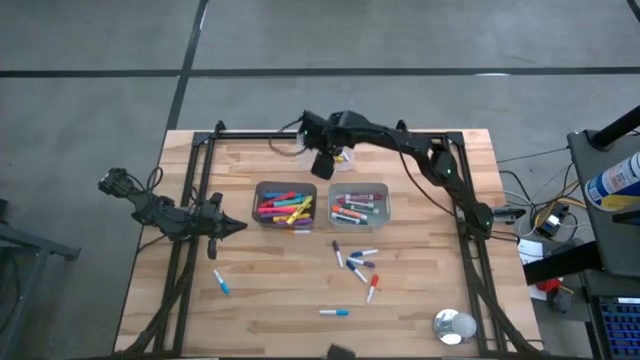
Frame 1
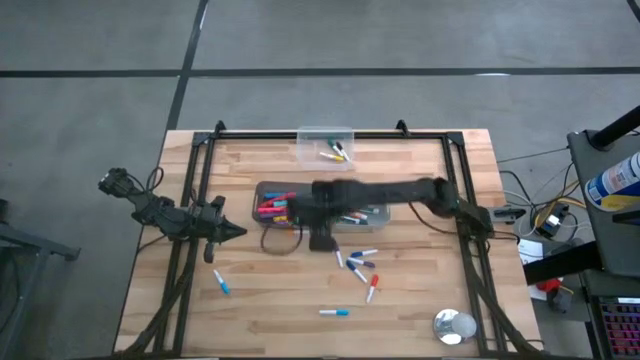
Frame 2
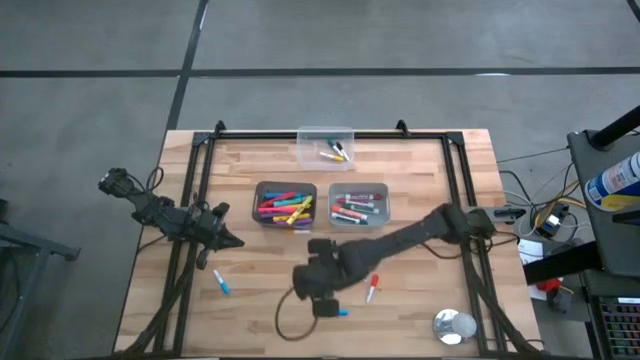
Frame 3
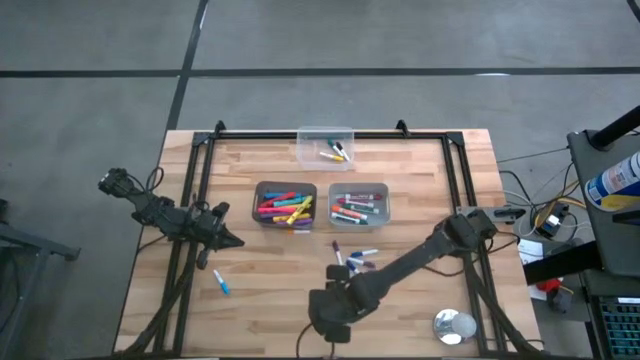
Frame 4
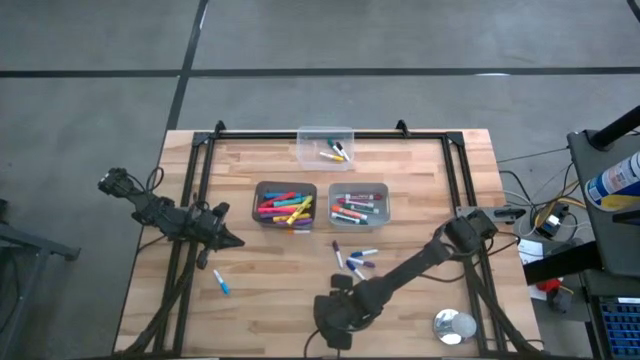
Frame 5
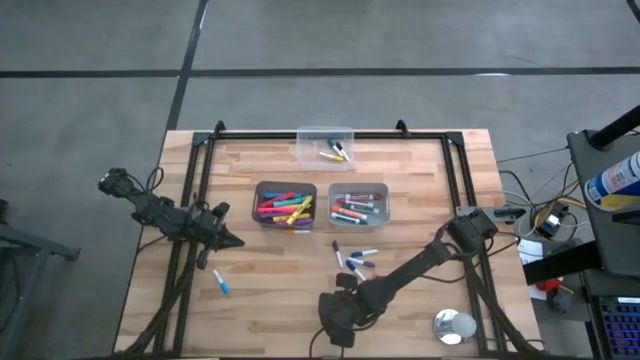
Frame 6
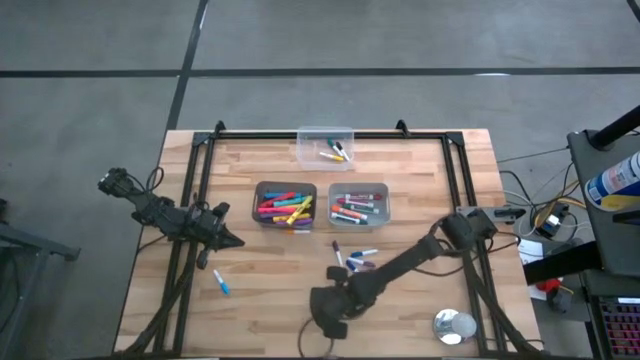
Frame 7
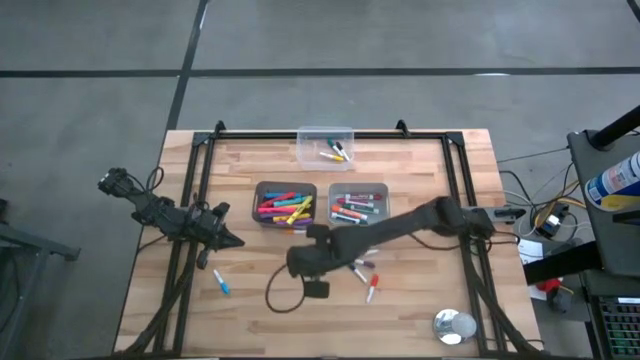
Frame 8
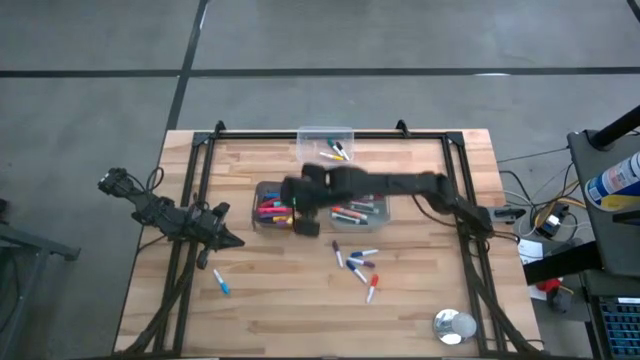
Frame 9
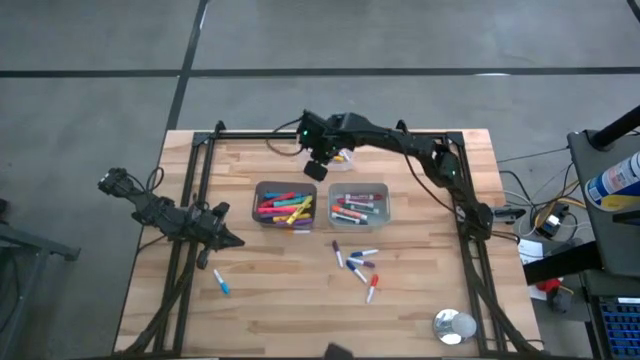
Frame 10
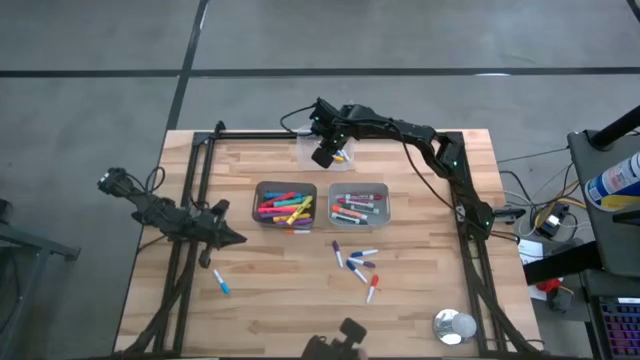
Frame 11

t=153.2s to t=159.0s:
Task: Pick & Place Markers
Put the bottom small light blue highlighter pen into the transparent bin

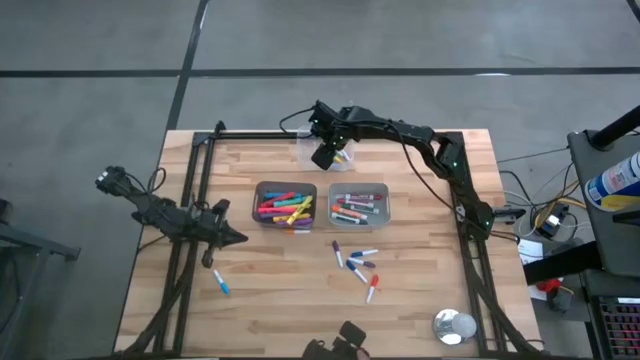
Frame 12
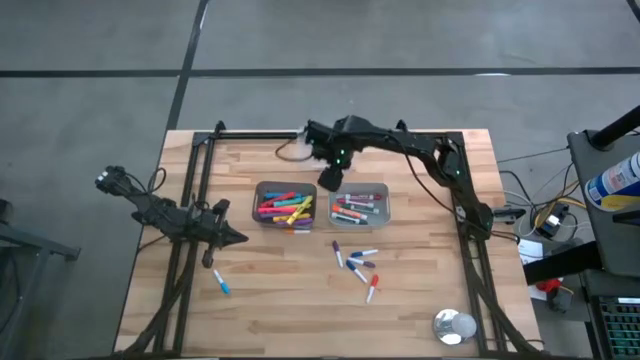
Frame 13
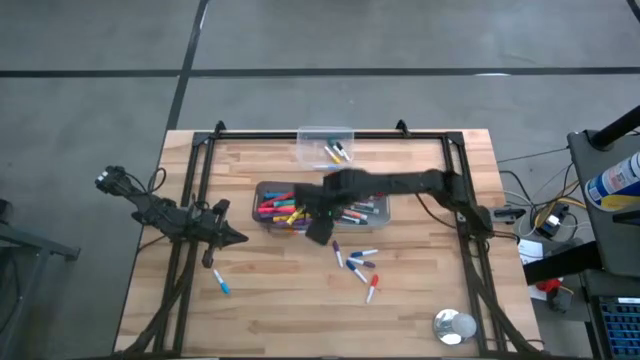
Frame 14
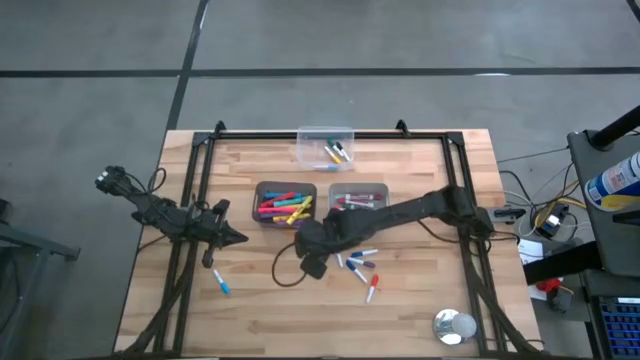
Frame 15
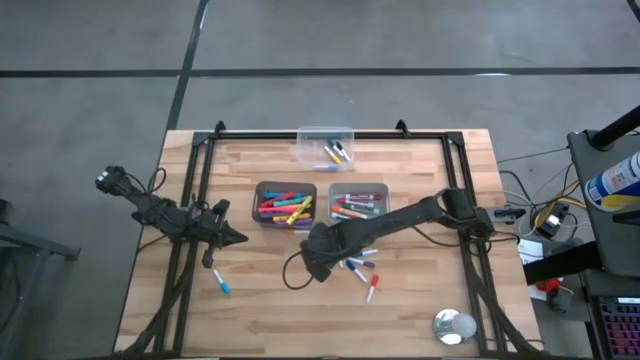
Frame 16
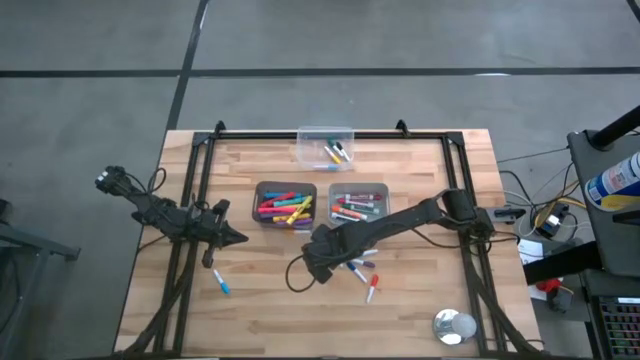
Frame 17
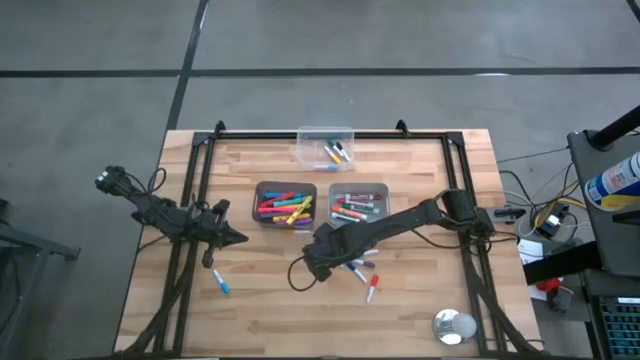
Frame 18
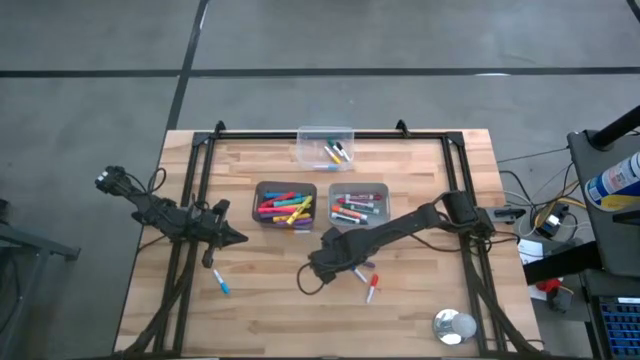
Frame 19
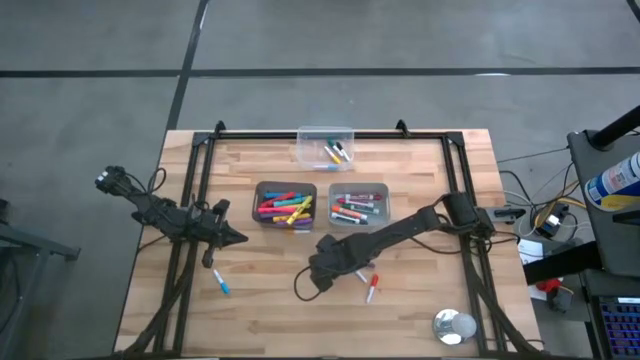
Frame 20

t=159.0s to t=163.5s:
Put the left small purple highlighter pen into the transparent bin

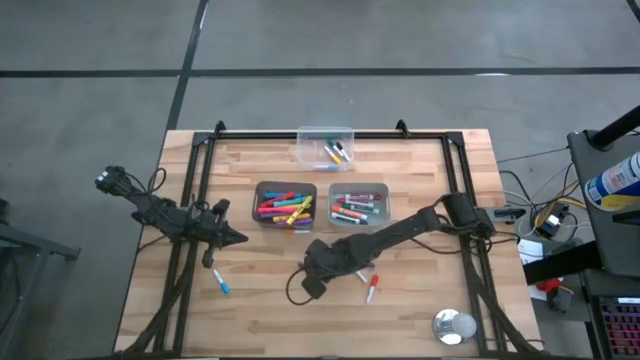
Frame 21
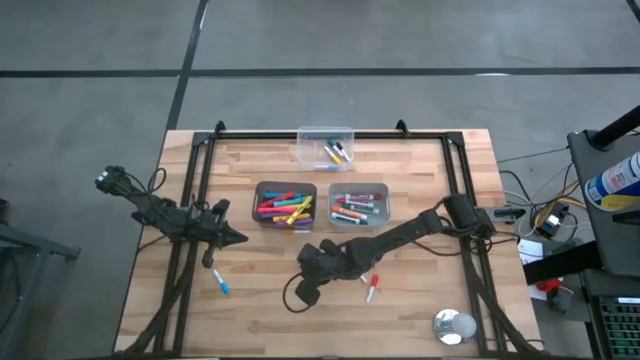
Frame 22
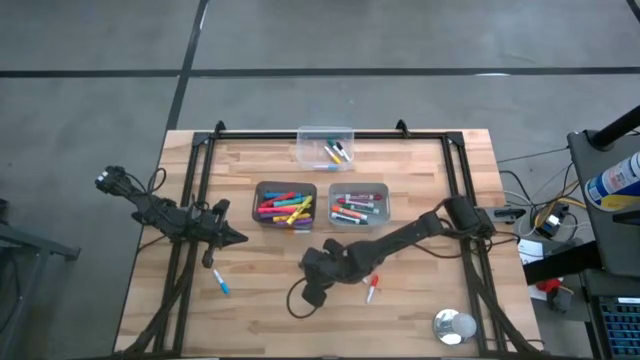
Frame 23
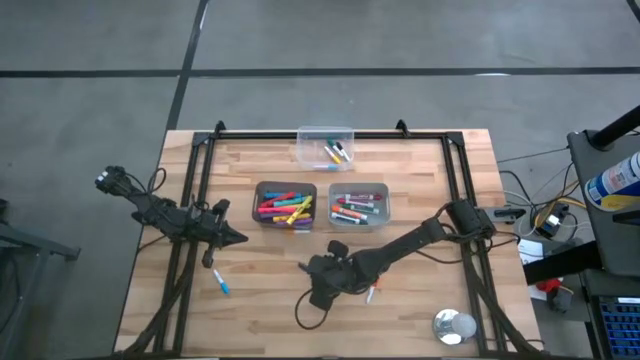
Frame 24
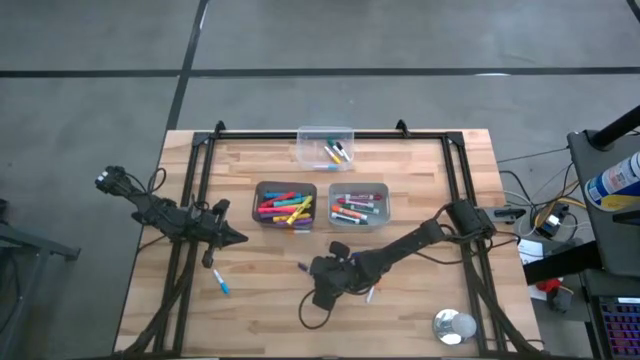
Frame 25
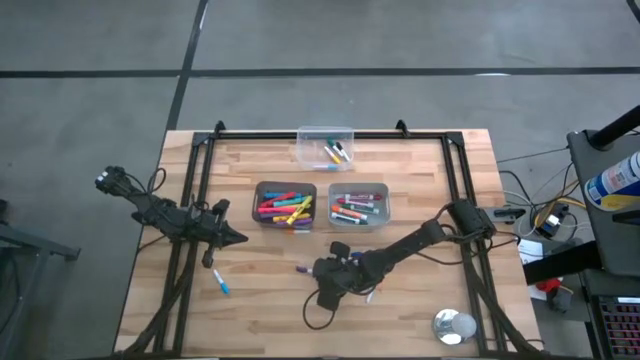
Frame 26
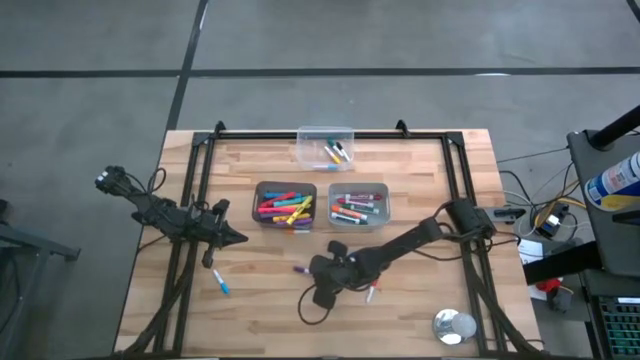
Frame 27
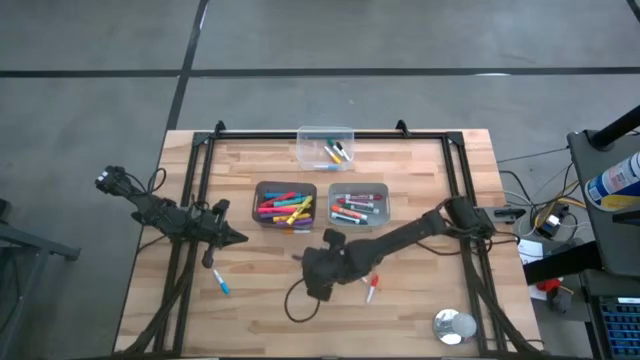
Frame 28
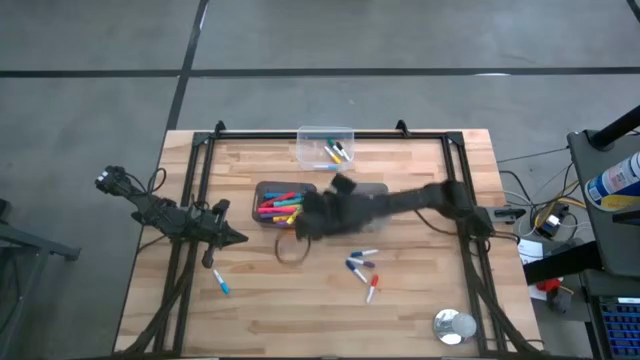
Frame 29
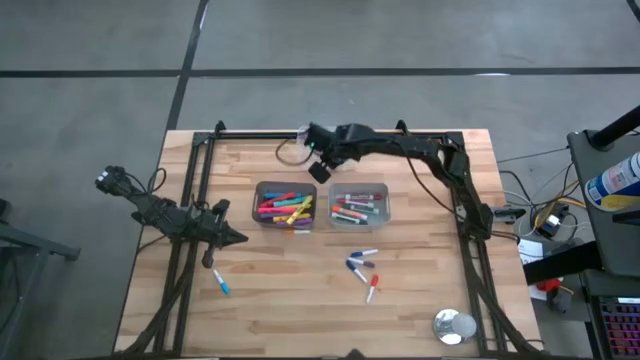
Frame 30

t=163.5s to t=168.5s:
Put the left small purple highlighter pen into the transparent bin

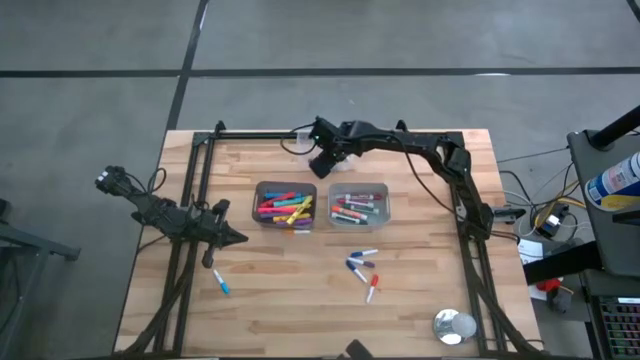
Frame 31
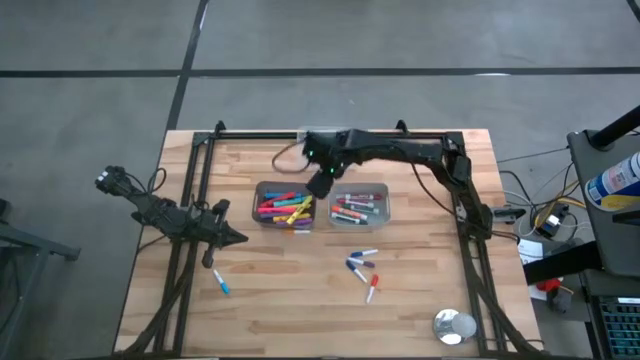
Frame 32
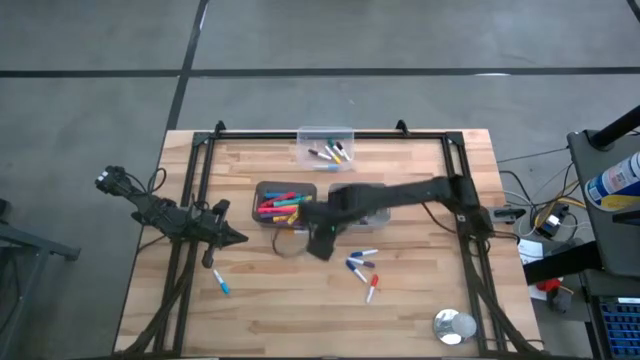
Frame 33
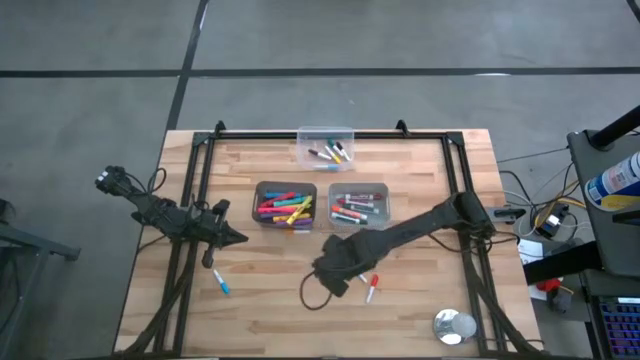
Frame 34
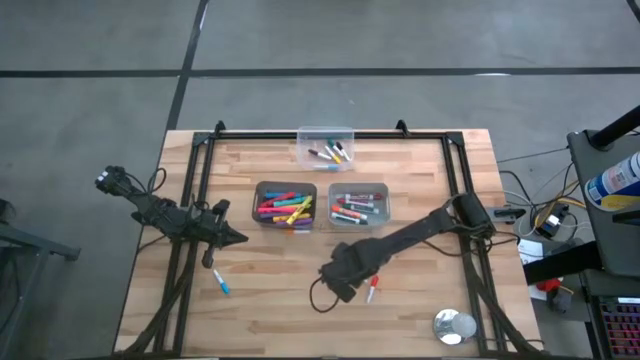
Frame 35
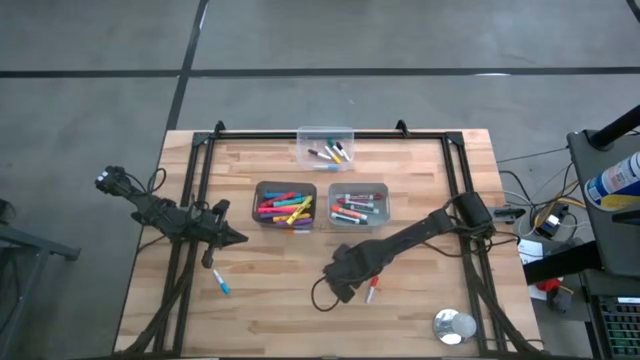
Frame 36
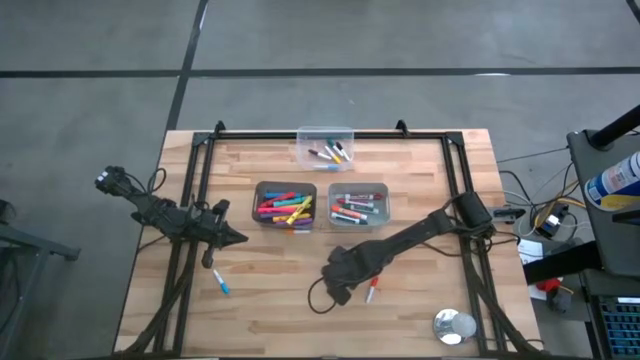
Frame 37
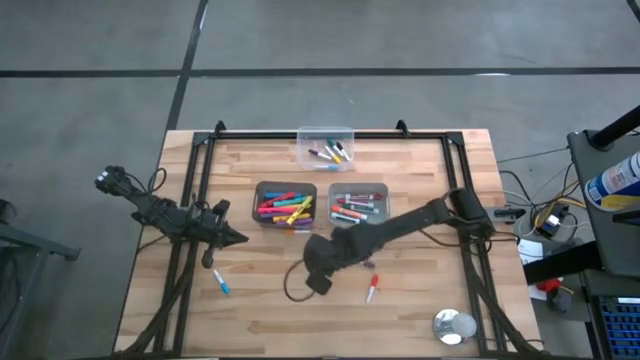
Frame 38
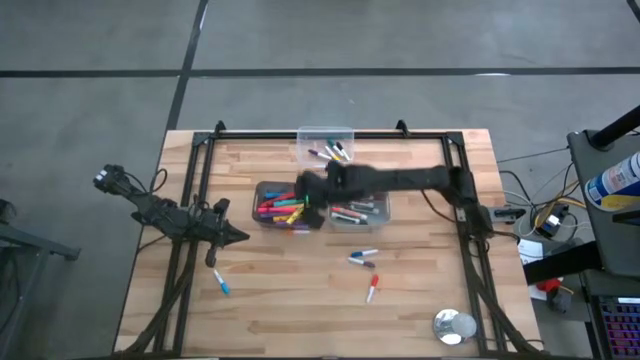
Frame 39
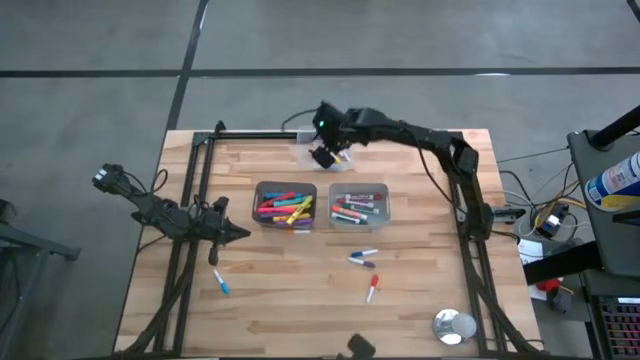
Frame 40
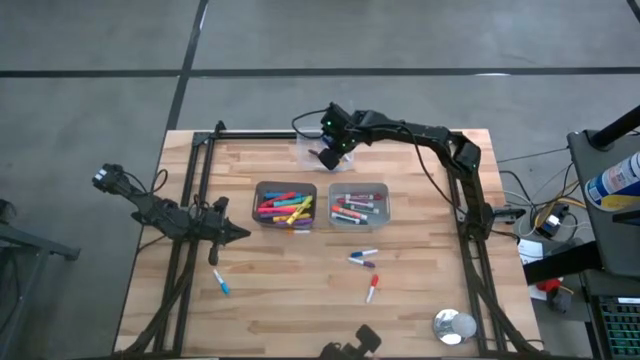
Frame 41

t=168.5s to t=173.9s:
Put the bottom small dark blue highlighter pen into the transparent bin
